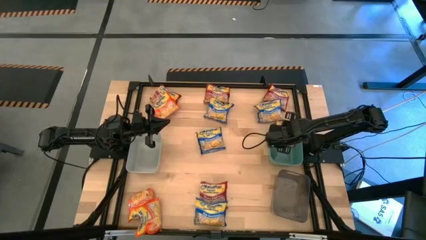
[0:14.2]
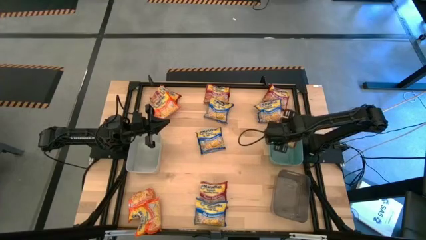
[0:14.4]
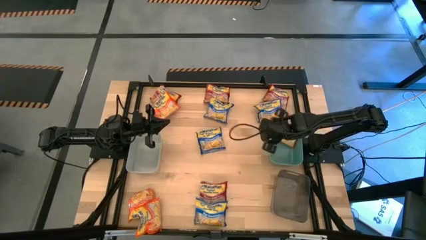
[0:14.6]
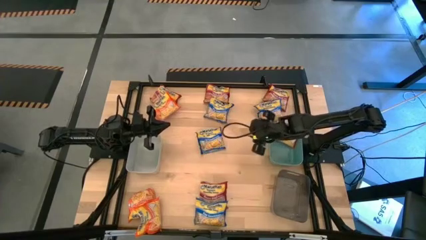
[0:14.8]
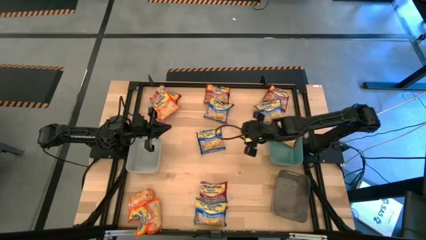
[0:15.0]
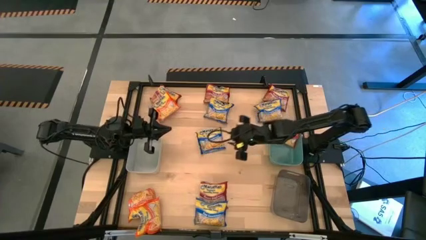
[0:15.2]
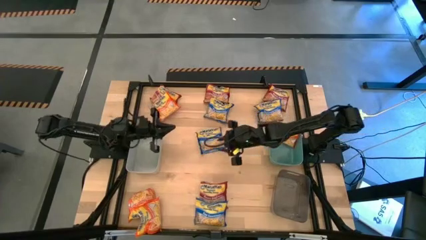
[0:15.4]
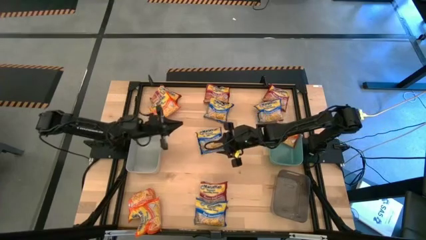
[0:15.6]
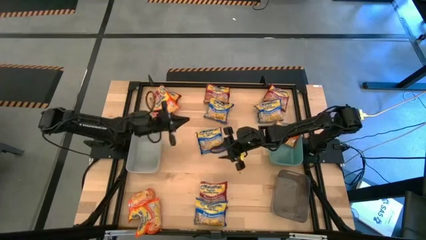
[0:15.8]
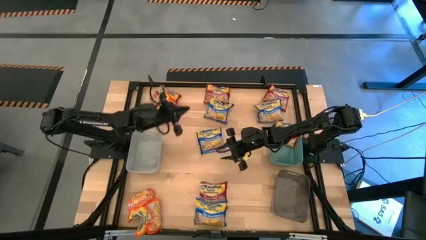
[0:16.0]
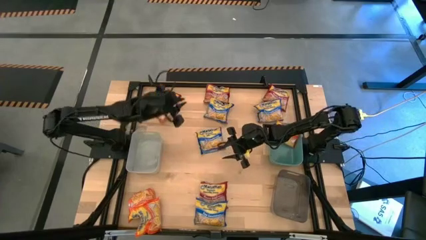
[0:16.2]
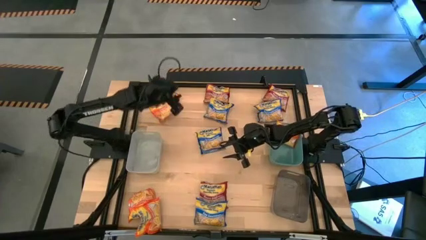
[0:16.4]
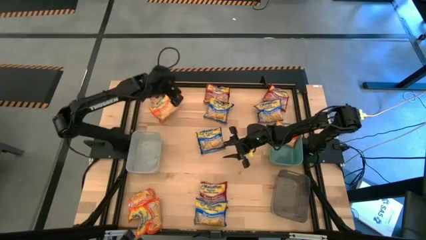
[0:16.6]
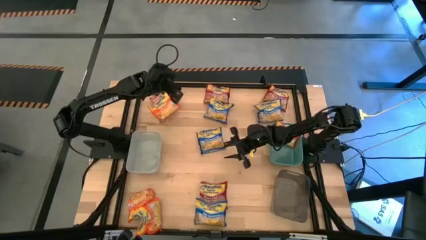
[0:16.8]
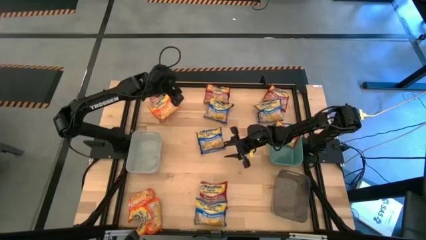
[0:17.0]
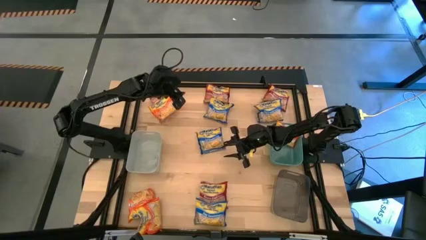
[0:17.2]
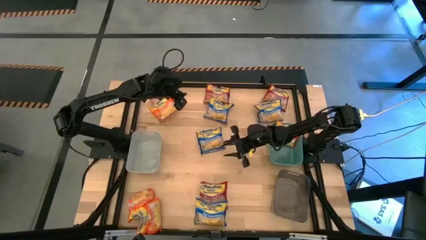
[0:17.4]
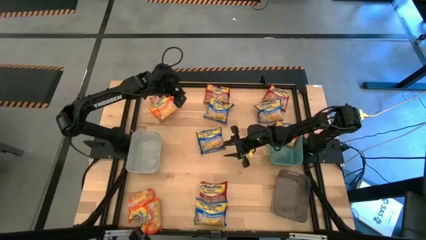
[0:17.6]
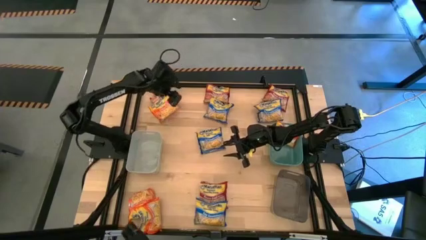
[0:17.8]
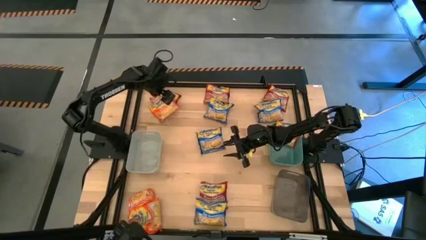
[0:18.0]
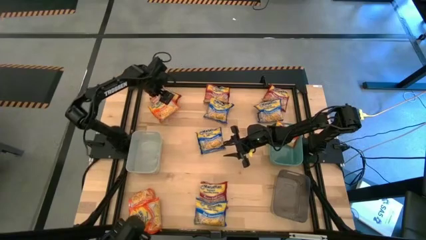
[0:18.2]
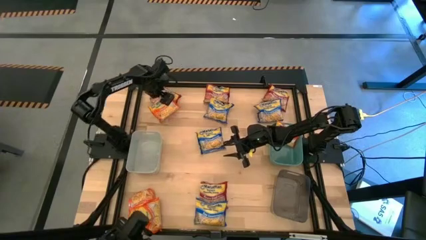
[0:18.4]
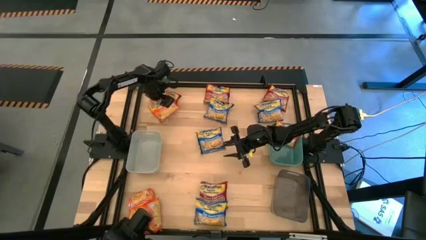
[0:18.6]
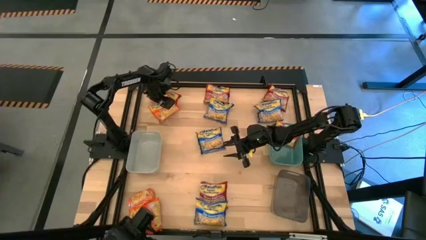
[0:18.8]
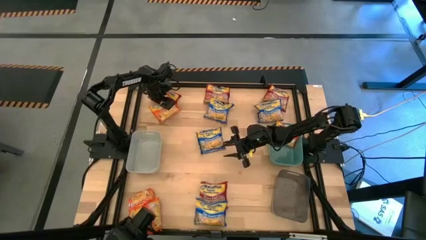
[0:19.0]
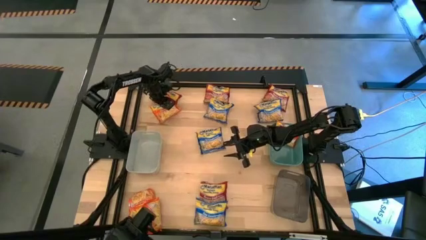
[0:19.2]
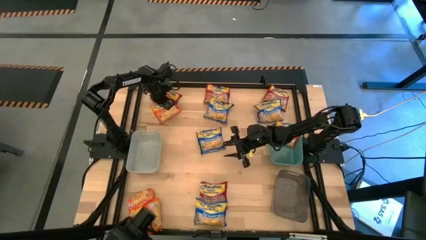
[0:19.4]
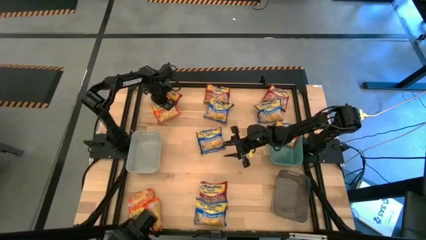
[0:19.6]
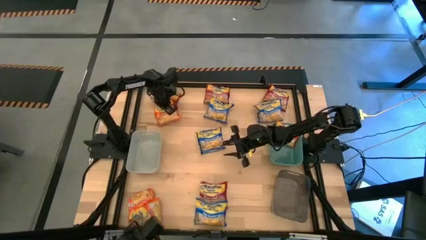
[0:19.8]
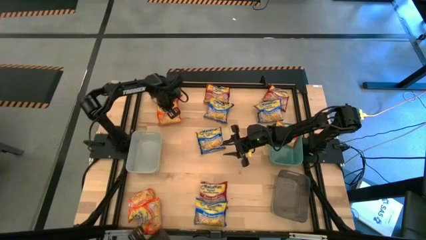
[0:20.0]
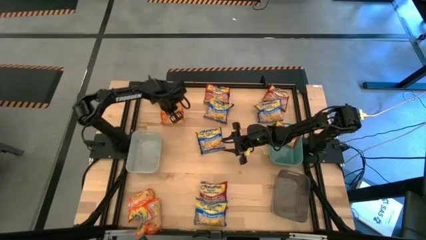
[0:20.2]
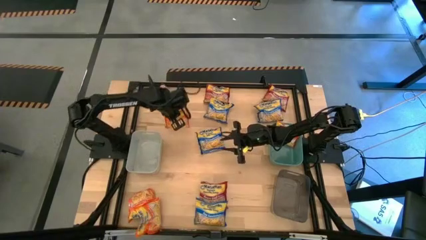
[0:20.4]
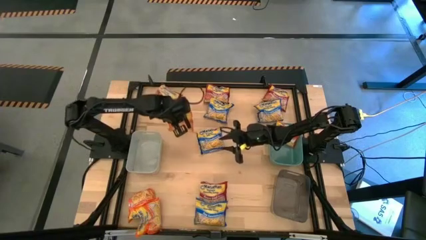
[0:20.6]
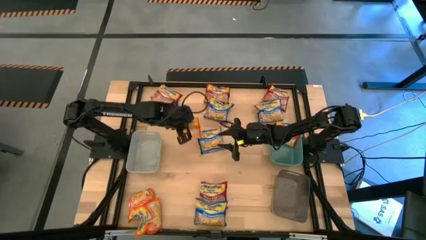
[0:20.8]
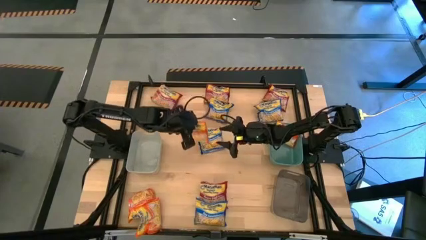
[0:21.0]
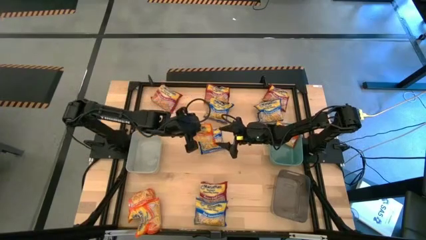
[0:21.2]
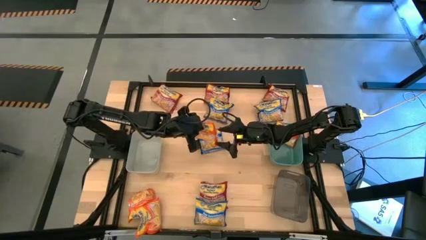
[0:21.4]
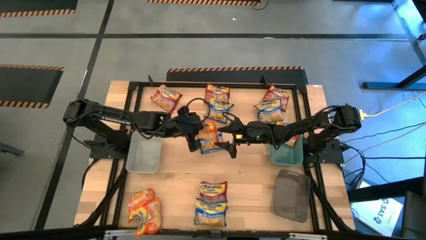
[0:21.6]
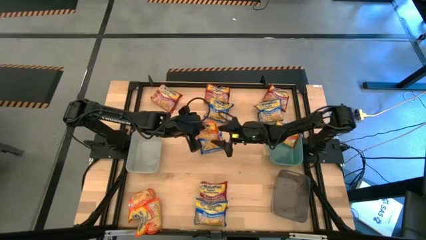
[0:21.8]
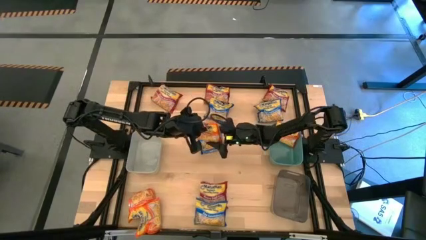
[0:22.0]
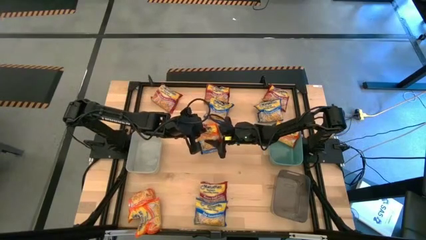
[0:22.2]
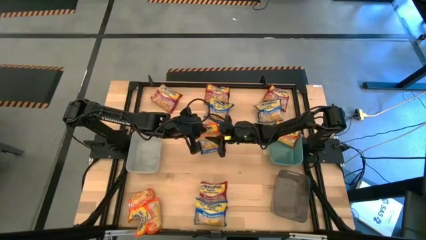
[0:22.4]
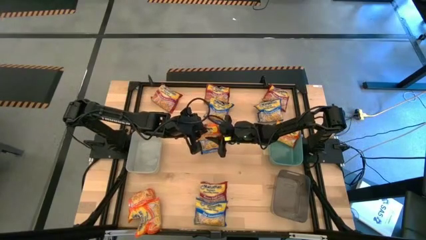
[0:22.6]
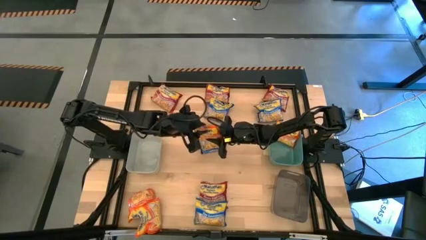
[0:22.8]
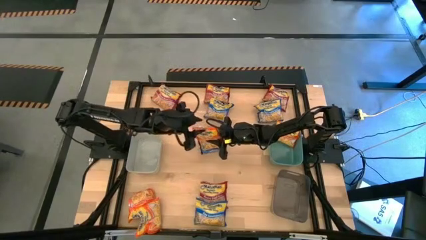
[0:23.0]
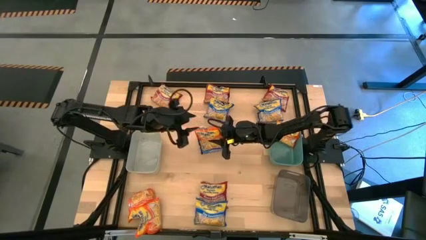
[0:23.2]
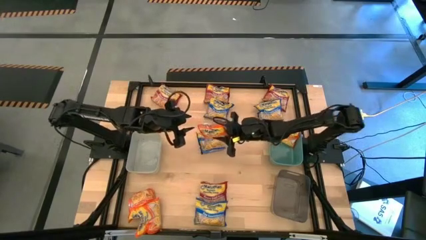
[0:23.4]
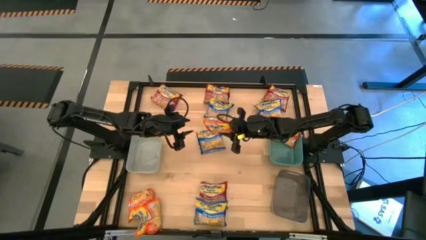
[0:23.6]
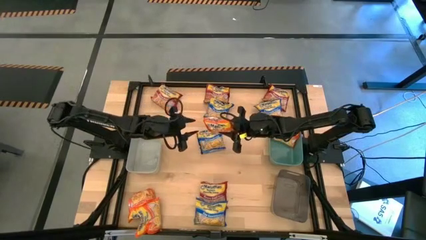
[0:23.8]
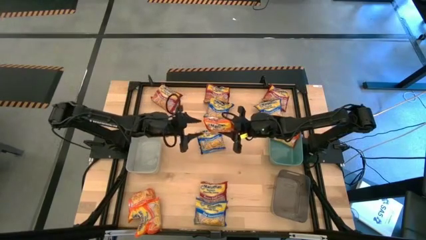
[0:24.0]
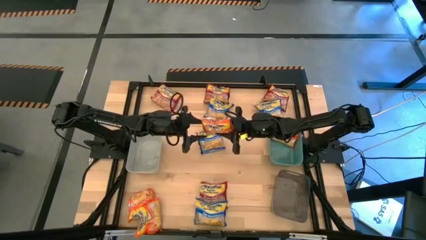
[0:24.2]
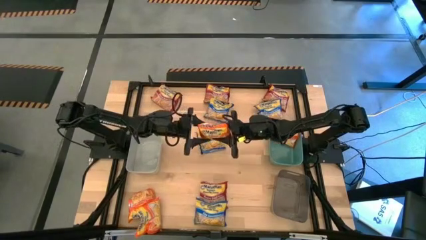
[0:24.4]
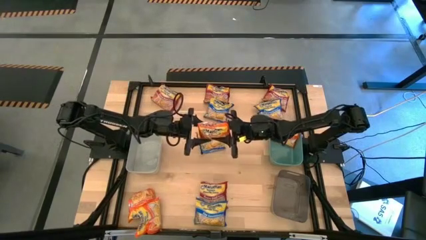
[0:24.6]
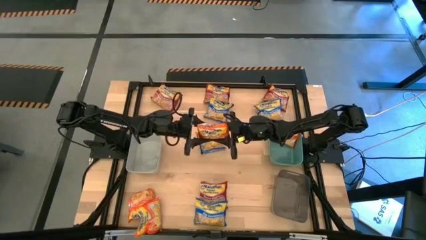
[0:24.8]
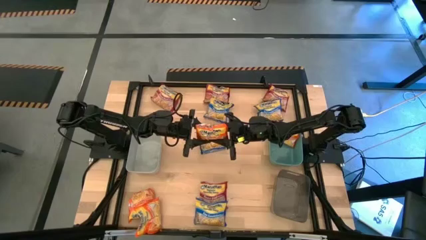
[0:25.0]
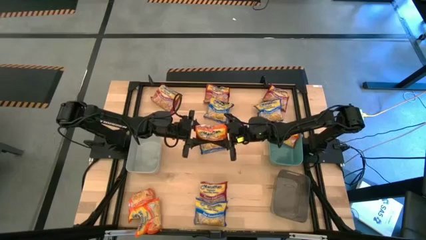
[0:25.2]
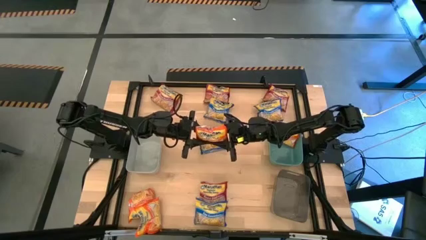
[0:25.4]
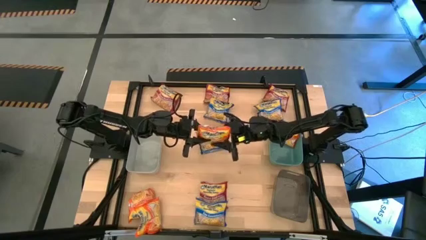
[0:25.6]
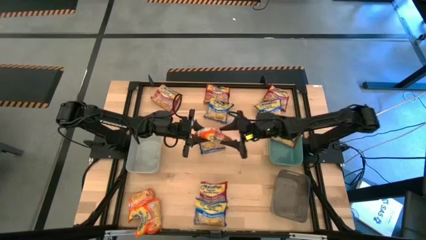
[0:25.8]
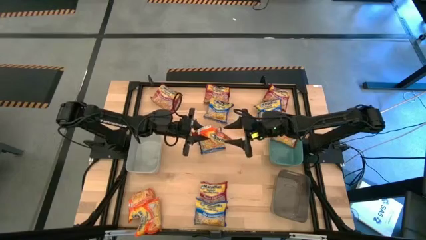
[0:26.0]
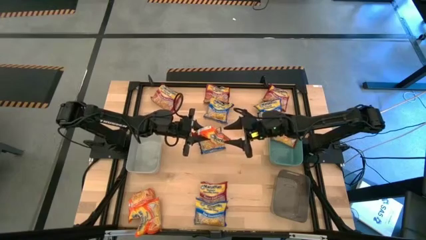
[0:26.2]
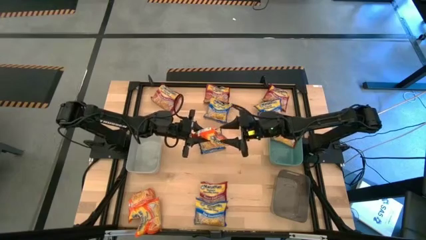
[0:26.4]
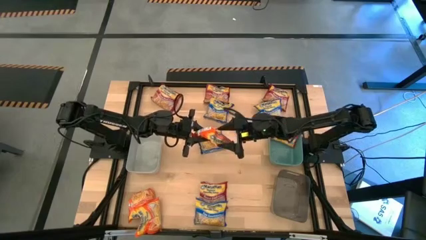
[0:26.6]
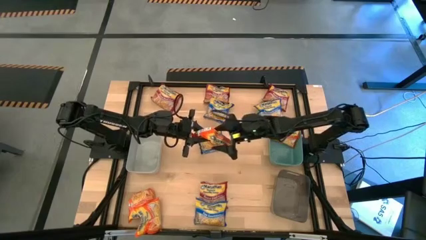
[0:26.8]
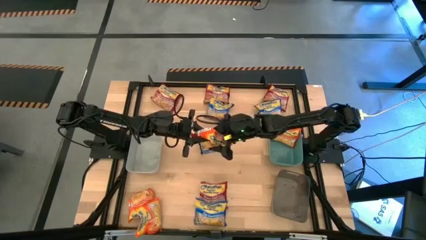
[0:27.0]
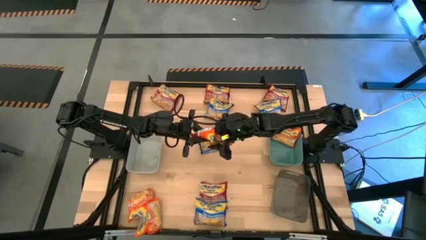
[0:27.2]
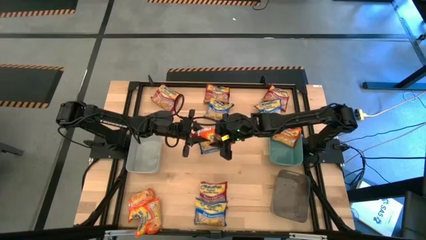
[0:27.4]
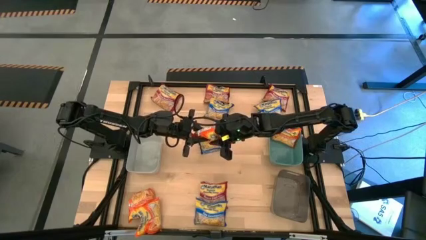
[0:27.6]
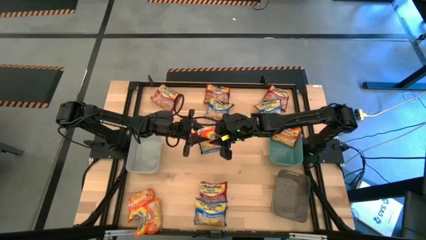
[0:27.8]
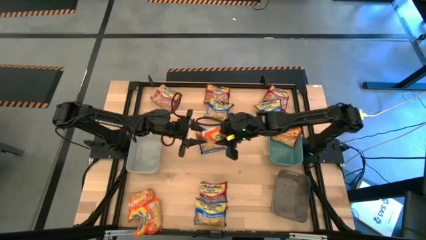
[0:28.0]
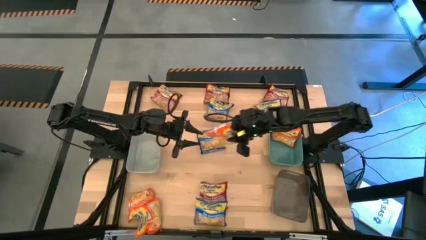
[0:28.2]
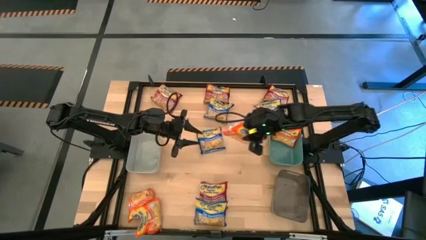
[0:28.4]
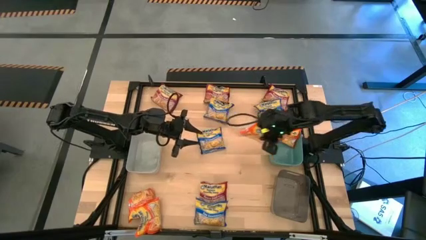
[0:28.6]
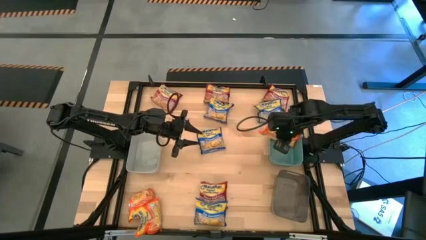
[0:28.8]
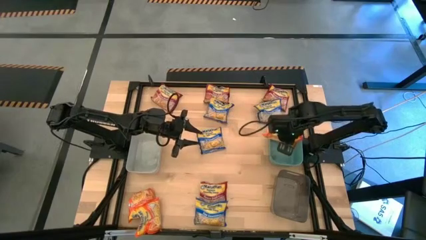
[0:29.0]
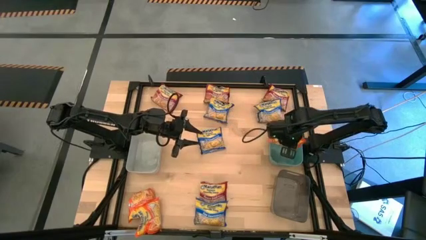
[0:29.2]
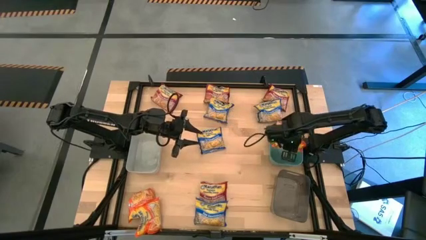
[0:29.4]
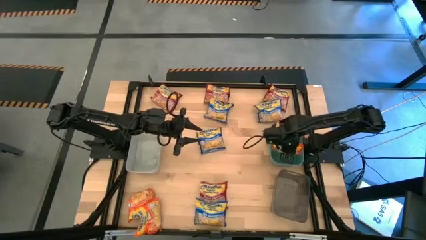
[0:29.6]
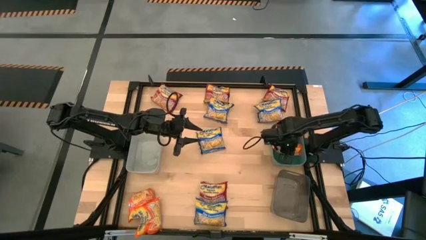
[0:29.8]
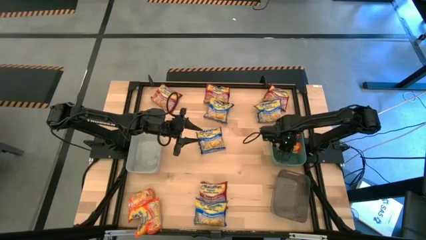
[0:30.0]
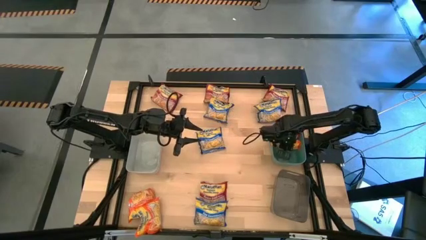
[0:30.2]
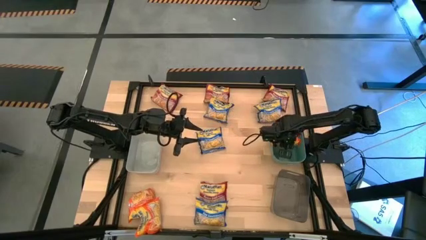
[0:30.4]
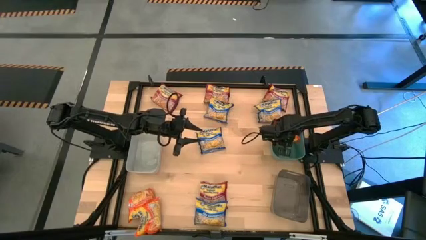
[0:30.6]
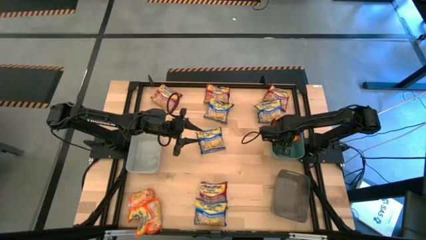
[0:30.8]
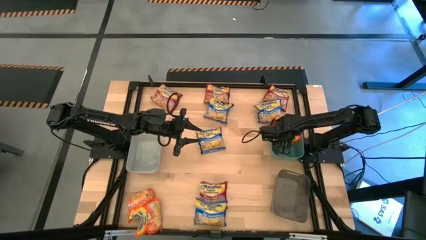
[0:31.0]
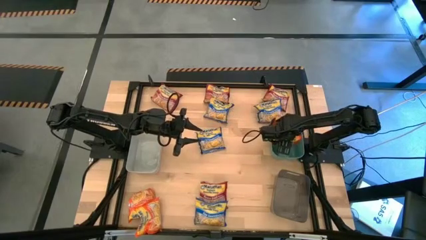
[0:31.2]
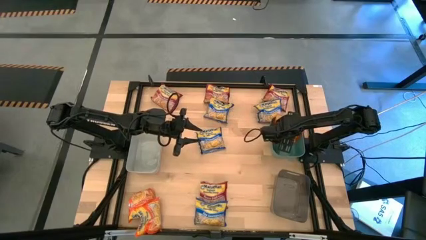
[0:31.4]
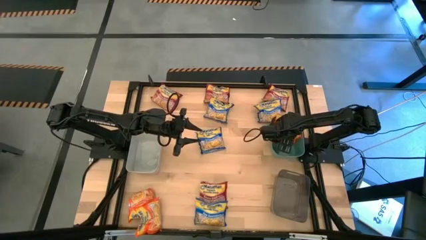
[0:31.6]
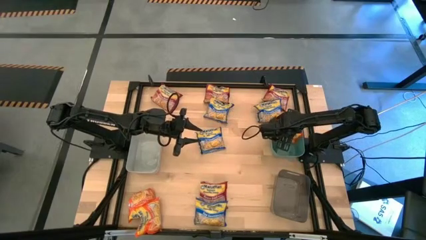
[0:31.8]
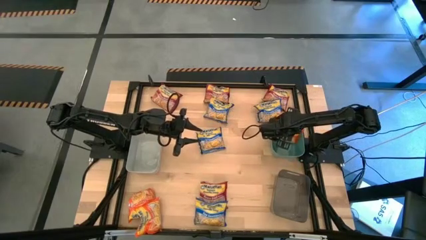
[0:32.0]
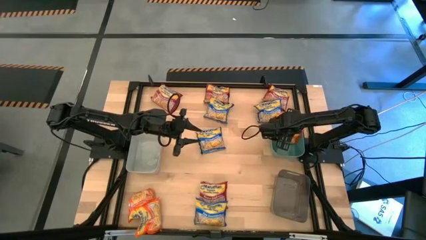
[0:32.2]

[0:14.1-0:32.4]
Task: Sort Maruchan noodles
Put the orange noodle pack into the green bin
